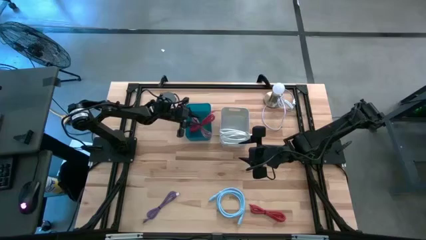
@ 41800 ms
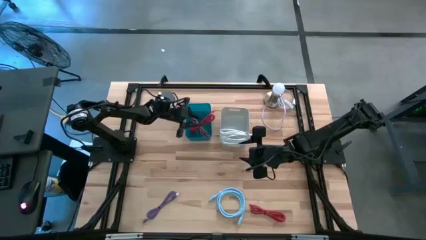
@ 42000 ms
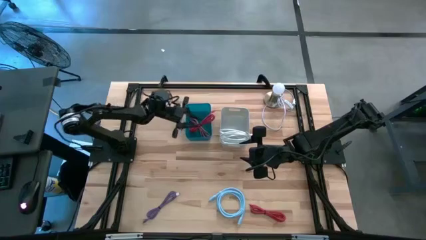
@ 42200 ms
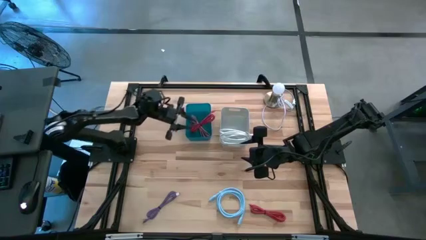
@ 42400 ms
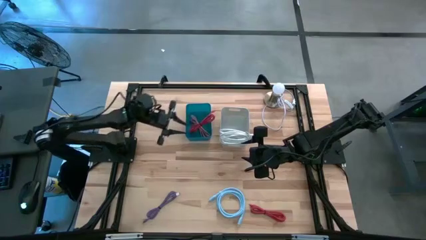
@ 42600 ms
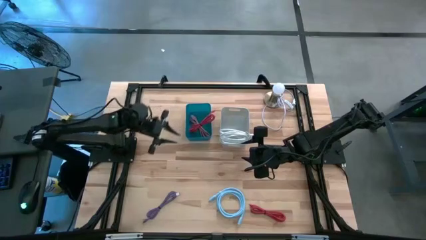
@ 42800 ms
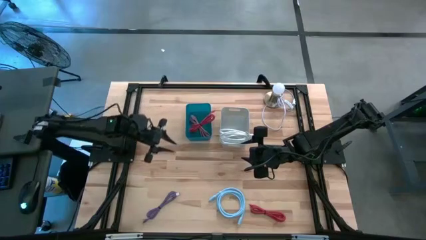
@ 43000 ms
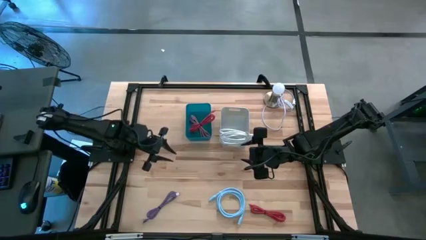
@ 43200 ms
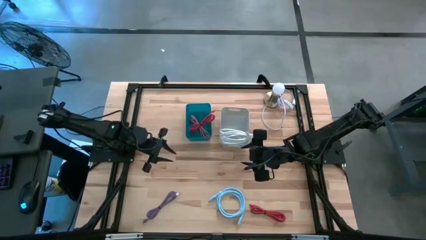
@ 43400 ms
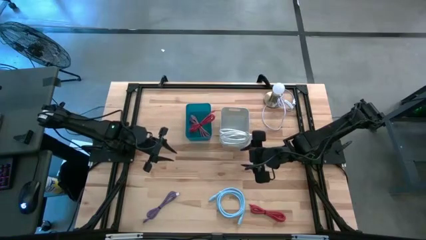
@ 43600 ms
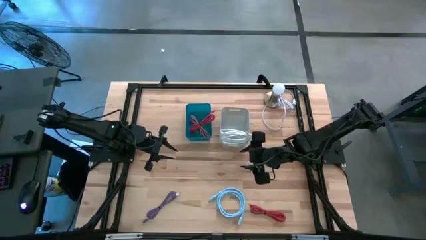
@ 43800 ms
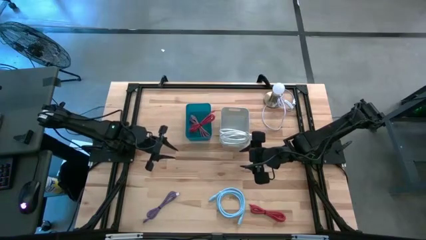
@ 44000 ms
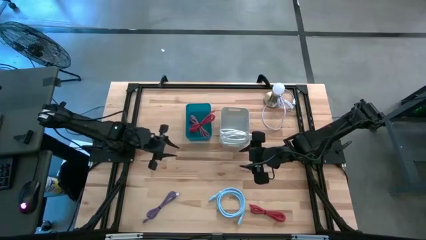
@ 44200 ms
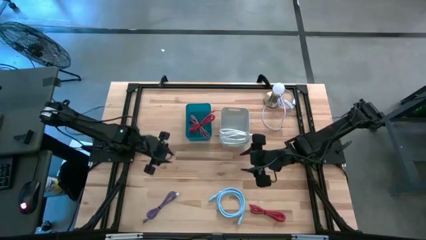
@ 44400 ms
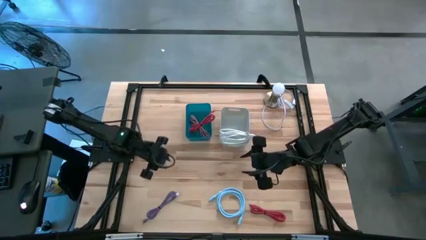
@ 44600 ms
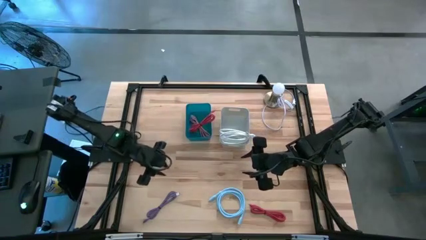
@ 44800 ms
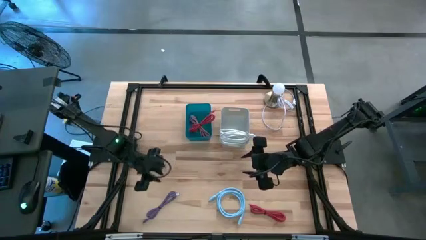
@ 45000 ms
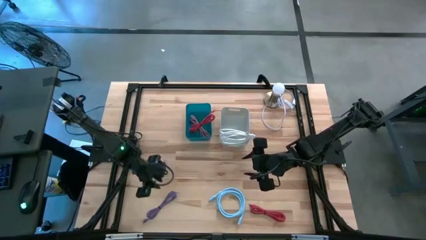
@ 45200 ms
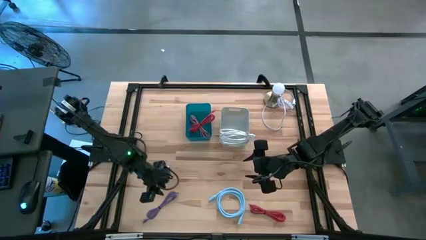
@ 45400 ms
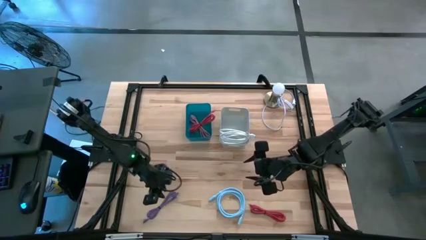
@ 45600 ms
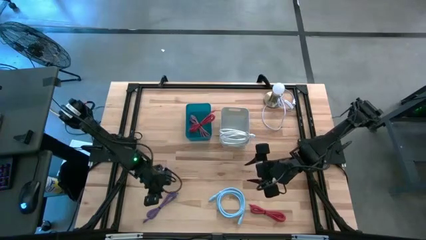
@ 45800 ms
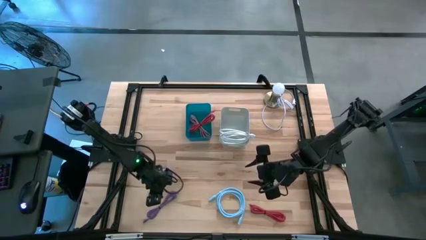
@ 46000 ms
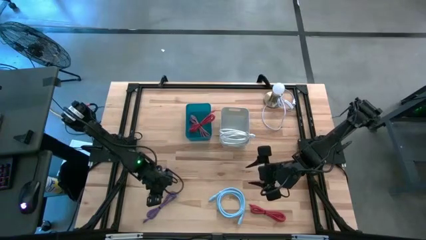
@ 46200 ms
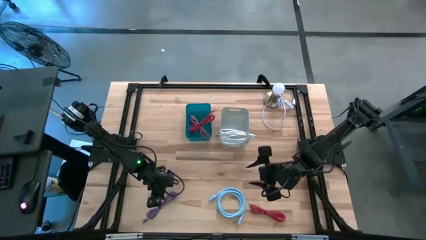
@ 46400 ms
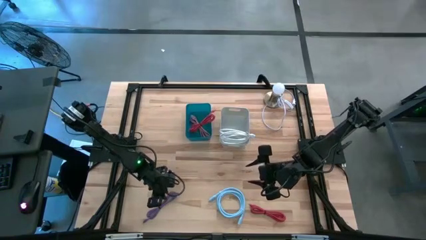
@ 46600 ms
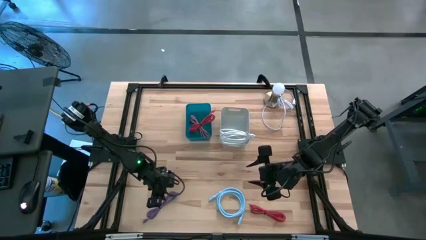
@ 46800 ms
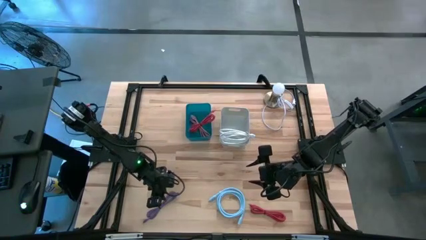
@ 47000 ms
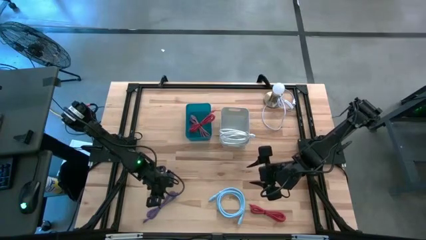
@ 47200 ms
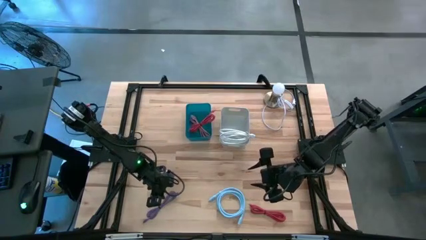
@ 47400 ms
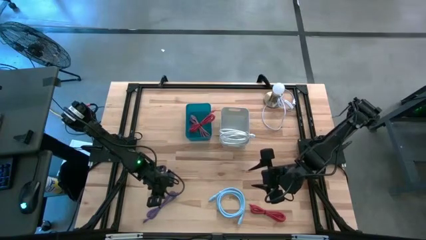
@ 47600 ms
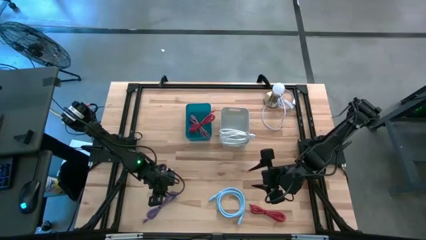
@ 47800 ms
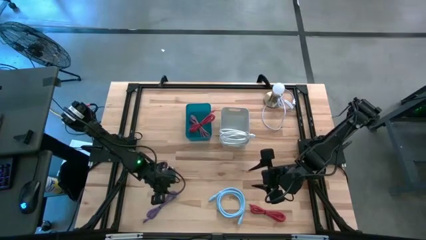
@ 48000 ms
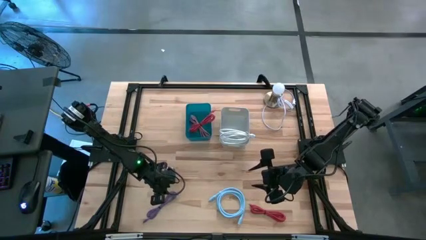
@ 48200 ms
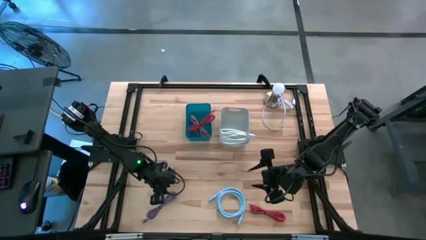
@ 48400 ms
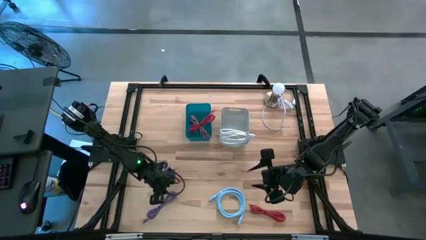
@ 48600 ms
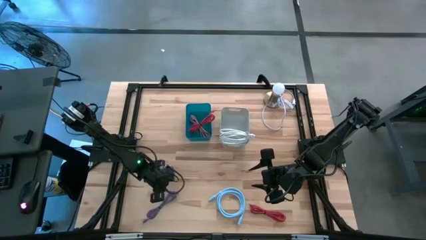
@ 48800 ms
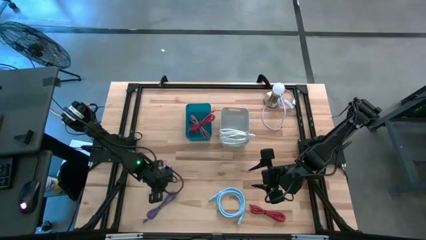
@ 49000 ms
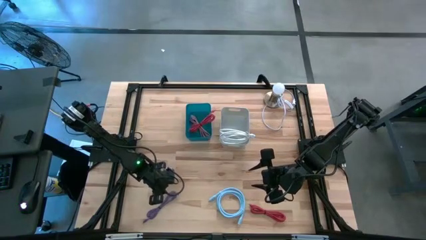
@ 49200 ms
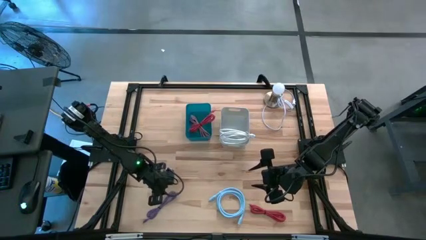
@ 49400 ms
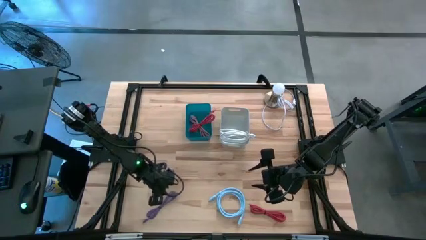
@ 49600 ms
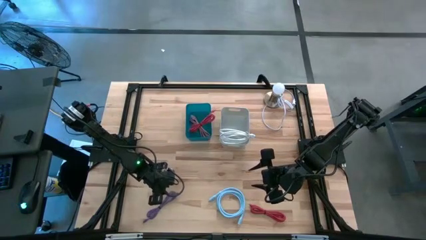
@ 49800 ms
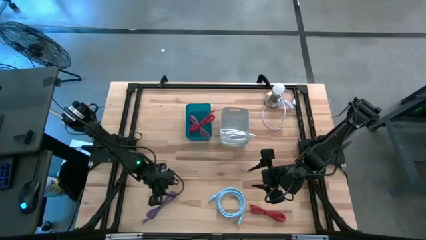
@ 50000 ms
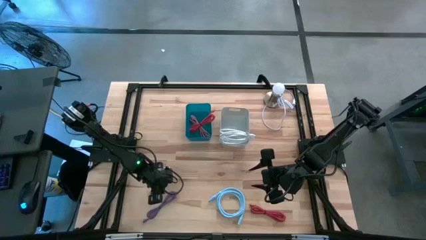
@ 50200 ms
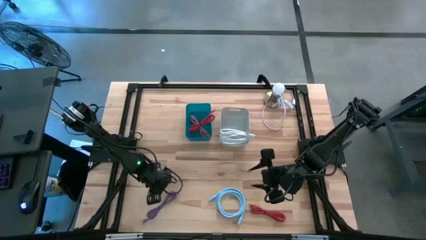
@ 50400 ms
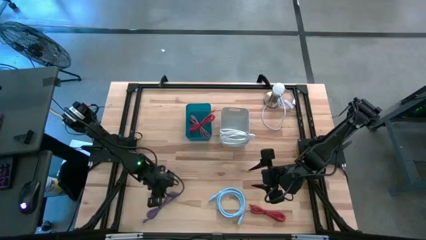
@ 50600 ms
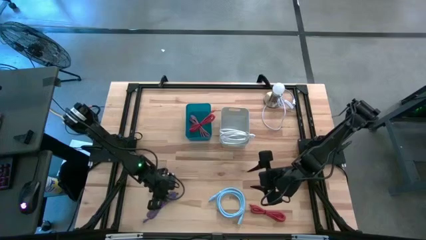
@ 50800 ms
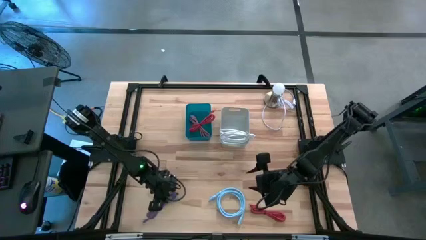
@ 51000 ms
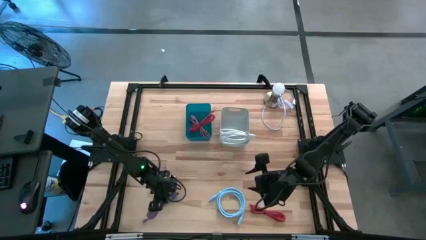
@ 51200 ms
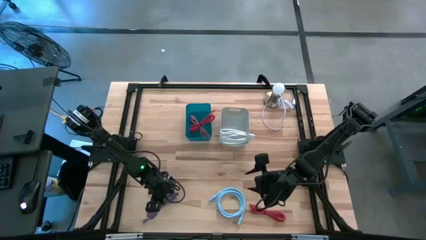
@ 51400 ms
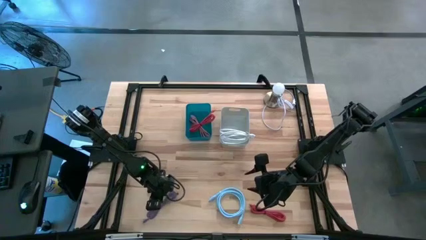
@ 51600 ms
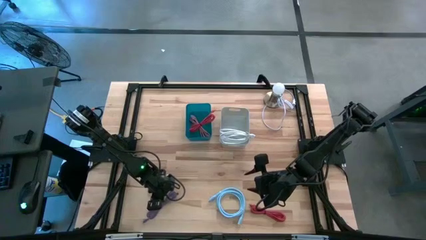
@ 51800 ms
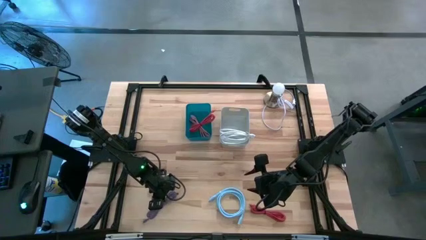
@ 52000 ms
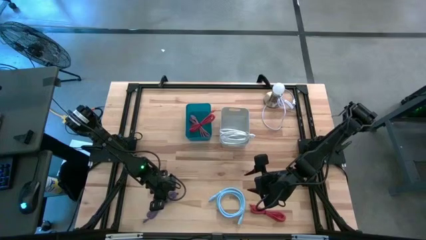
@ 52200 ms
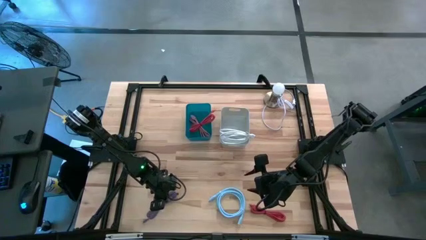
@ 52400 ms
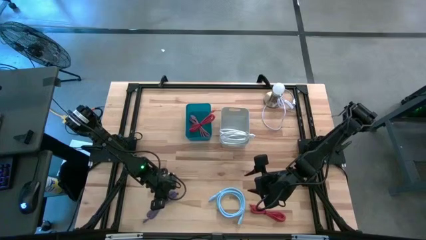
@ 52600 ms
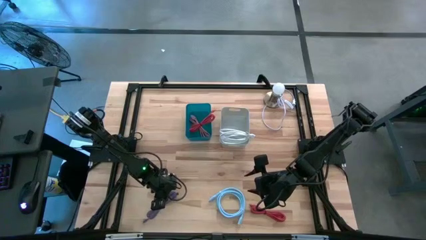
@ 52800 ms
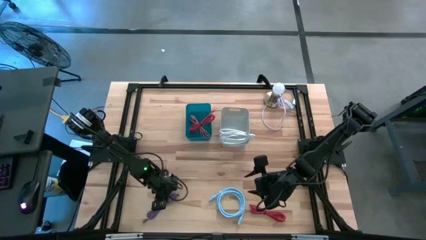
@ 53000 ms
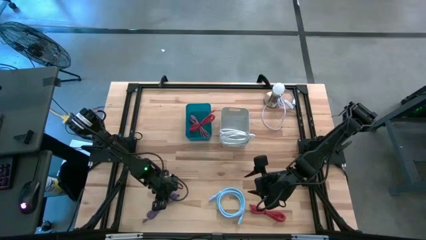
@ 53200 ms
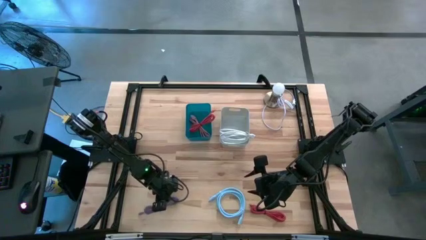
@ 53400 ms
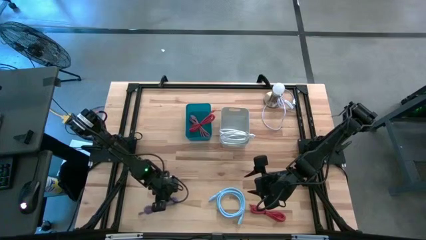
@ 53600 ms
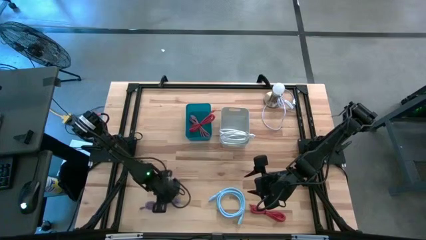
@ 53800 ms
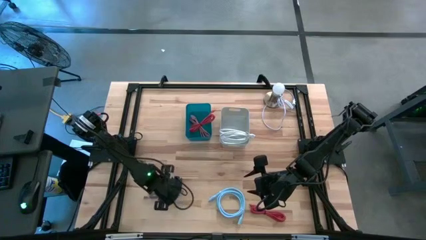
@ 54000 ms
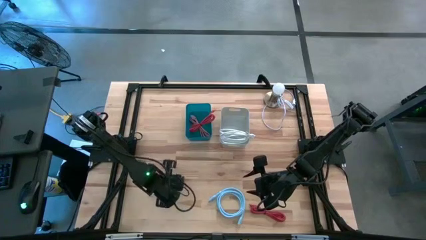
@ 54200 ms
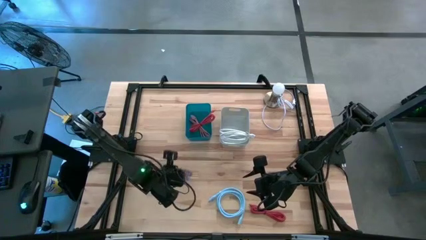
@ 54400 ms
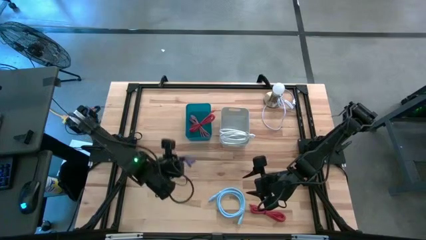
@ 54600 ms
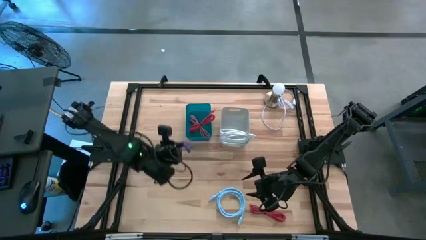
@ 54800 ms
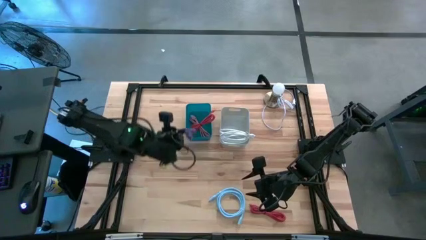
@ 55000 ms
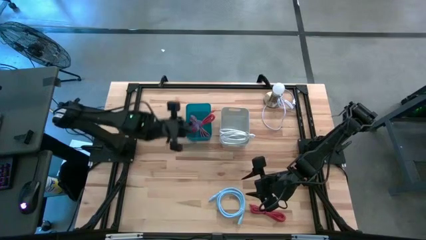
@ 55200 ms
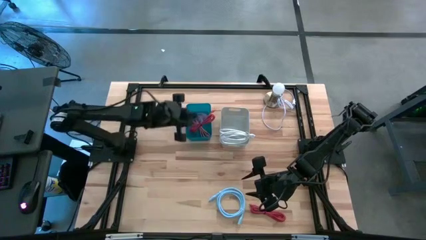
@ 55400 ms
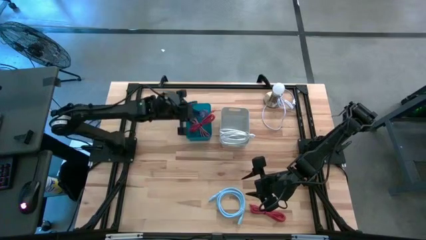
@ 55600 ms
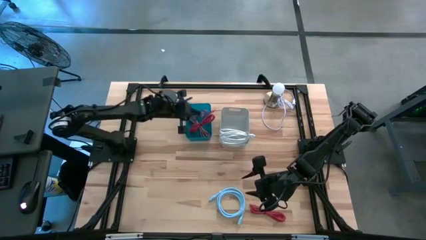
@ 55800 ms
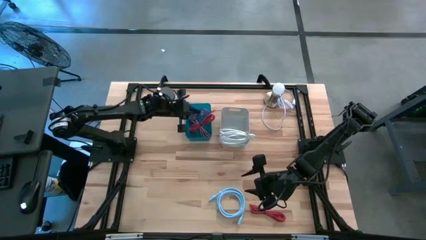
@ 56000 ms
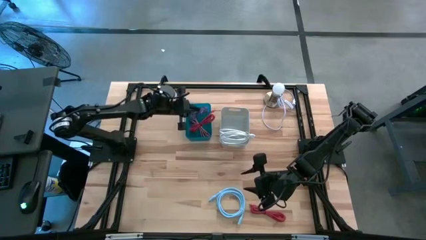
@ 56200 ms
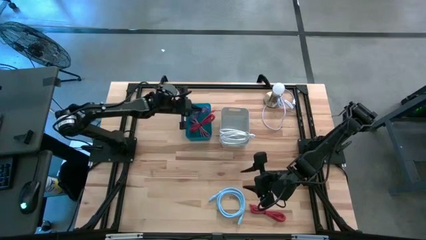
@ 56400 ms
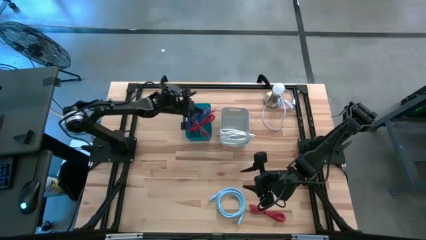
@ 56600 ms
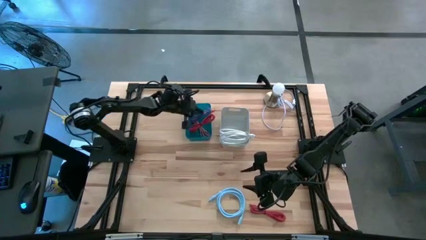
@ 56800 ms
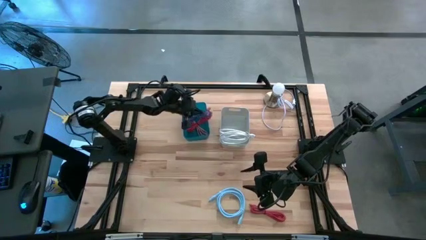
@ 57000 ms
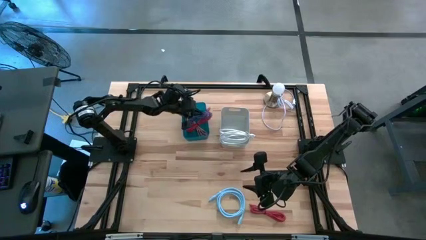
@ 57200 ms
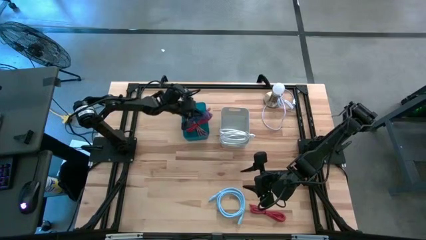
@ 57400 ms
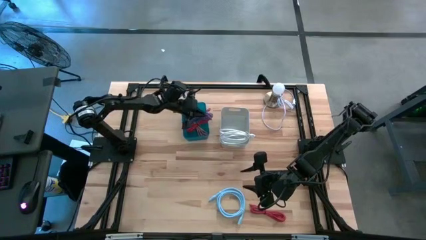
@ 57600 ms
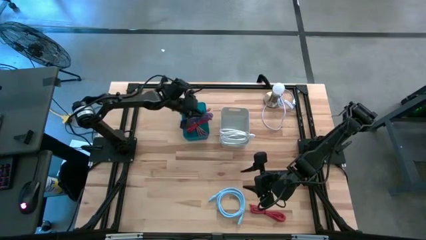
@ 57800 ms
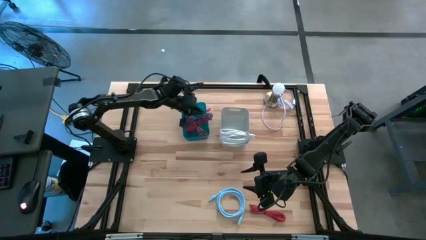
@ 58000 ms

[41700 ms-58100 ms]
Task: Pick & Place USB Port
Put the purple charger cable into the blue bin
